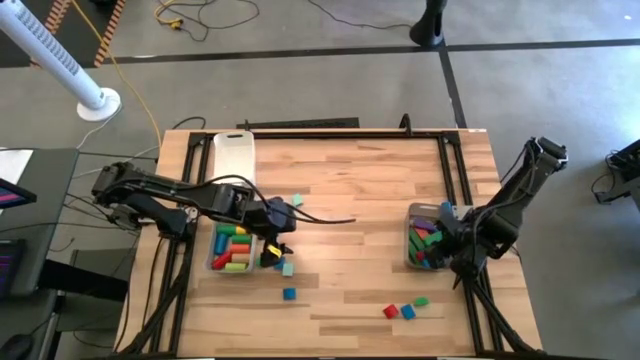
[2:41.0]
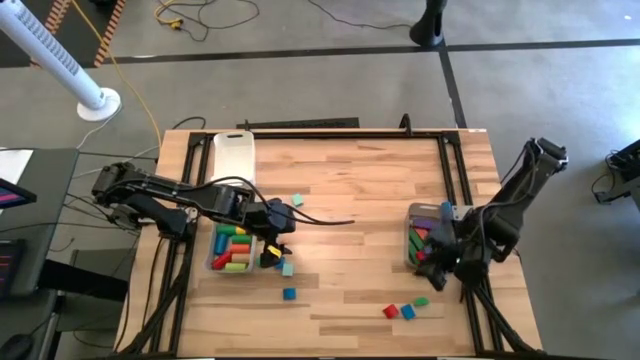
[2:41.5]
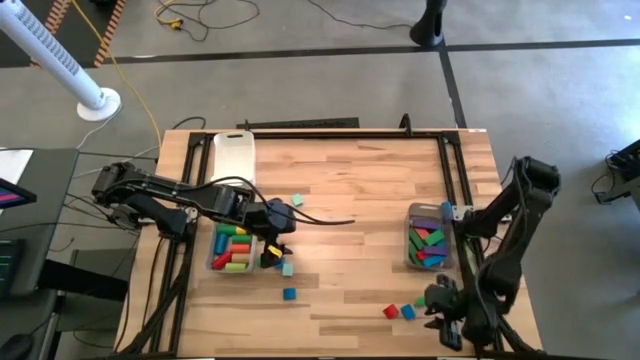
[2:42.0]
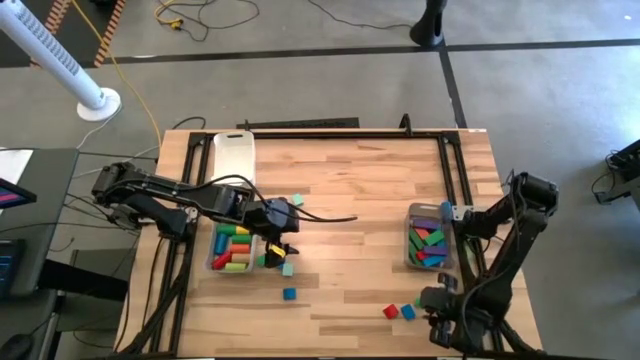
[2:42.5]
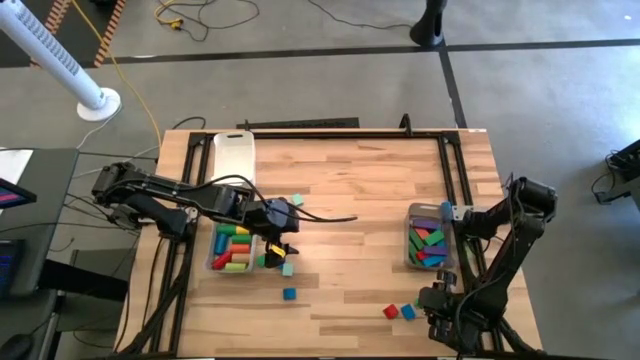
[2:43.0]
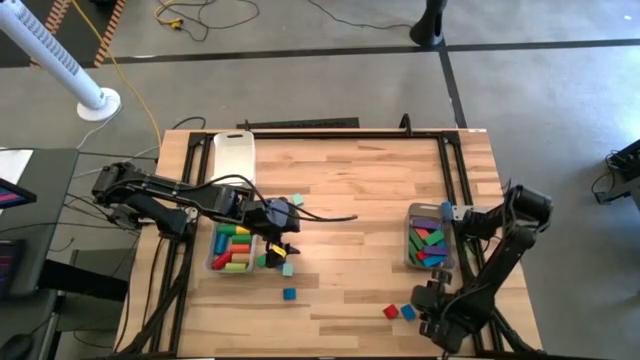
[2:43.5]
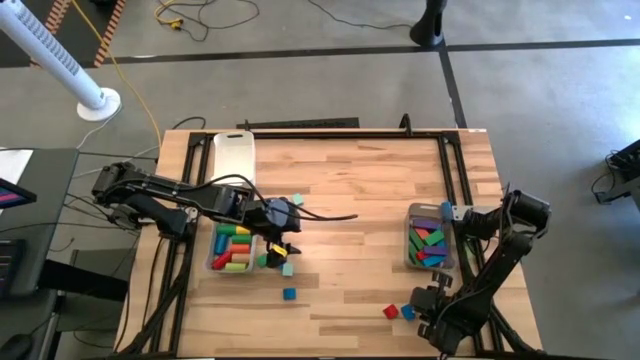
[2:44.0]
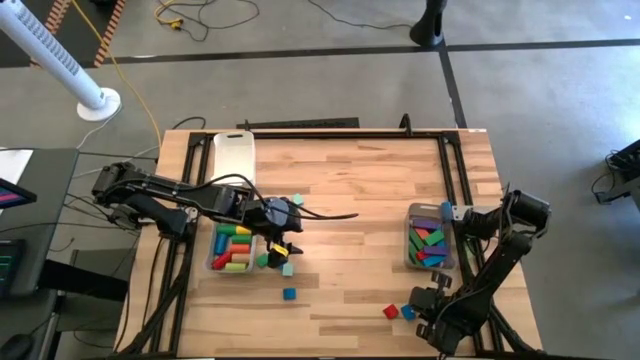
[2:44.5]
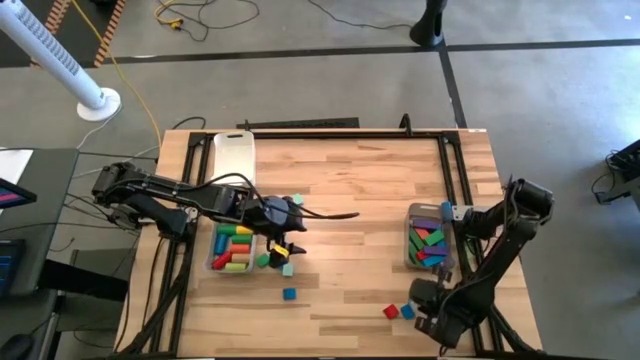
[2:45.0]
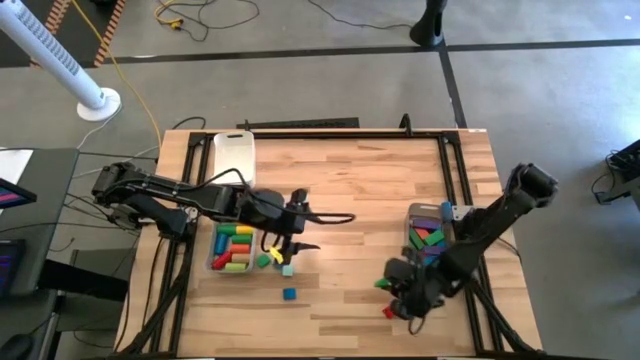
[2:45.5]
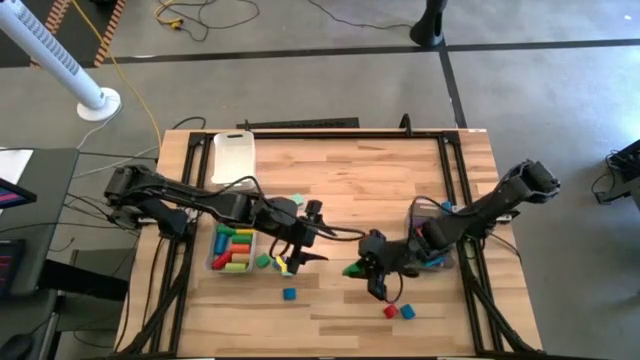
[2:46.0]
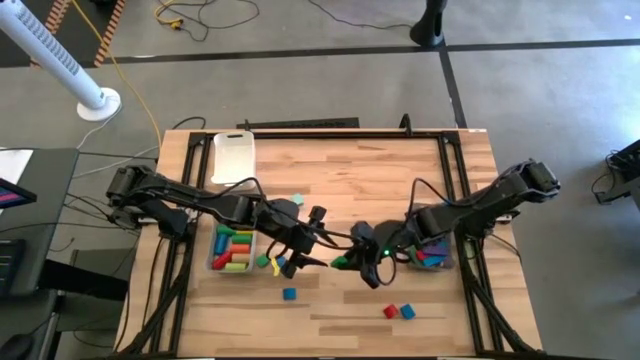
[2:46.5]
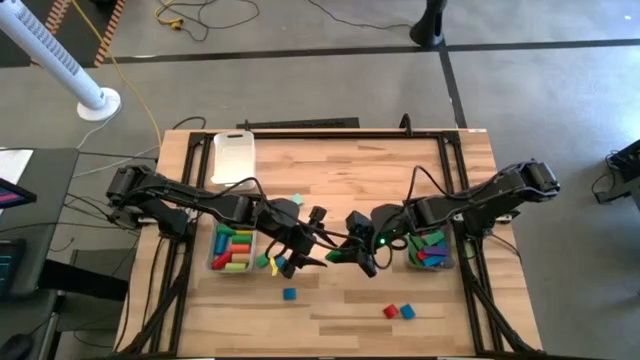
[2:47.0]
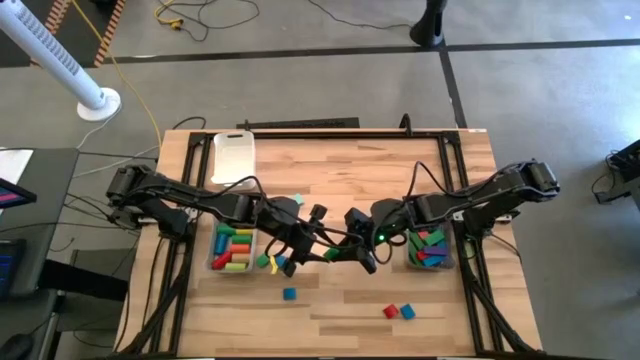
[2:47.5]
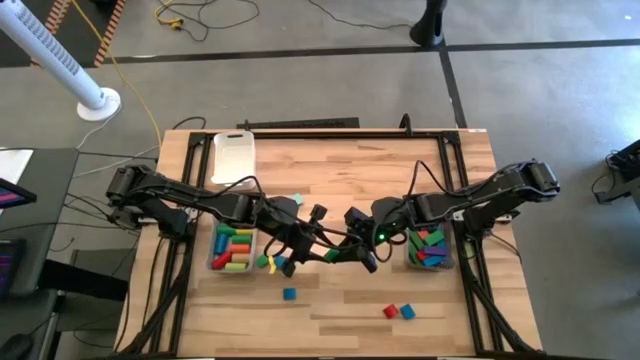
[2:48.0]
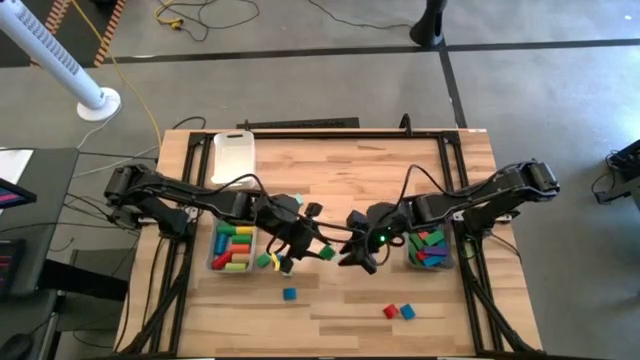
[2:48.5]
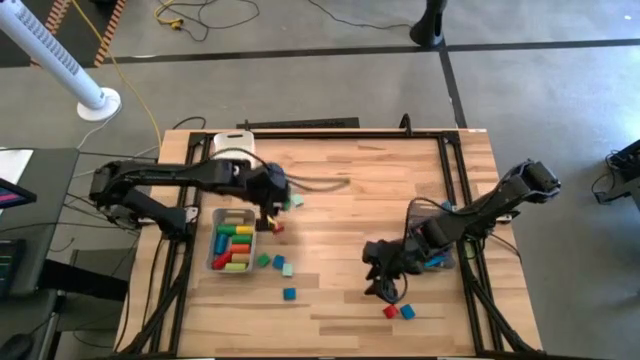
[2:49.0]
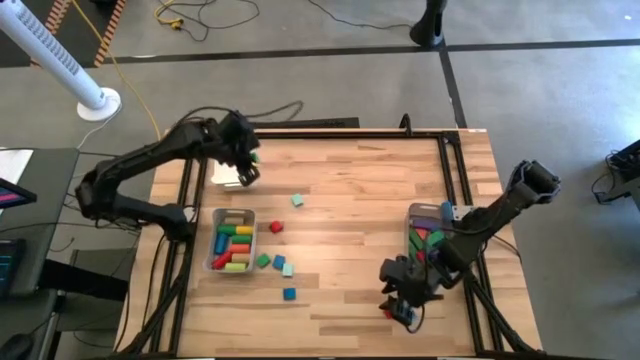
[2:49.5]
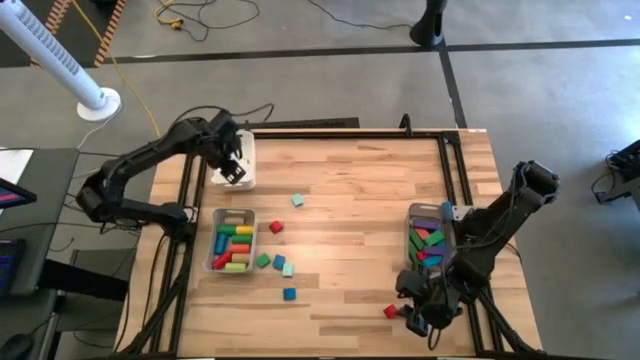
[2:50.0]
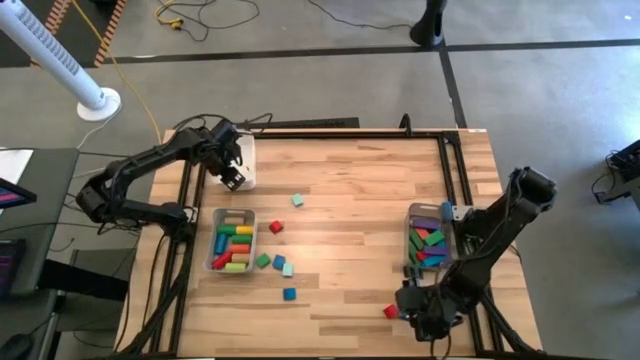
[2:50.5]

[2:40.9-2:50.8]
Task: Sort blocks by size
Put the dark green semicircular block into the white bin

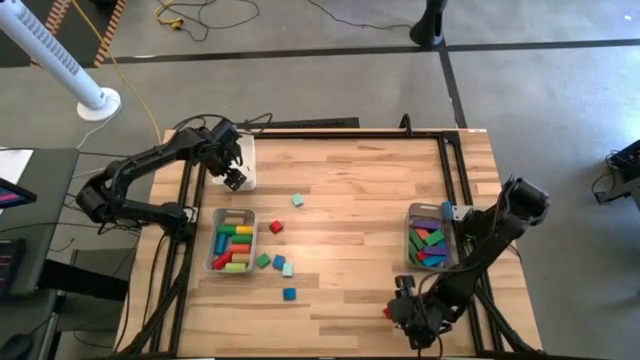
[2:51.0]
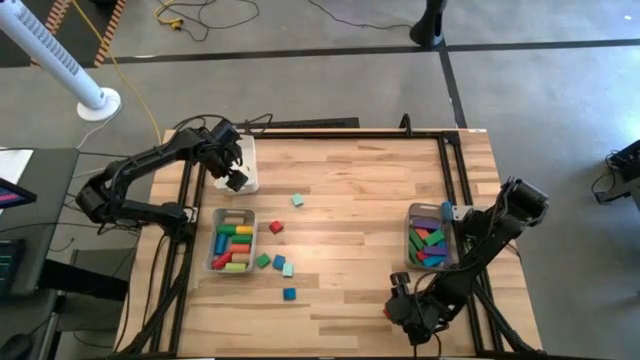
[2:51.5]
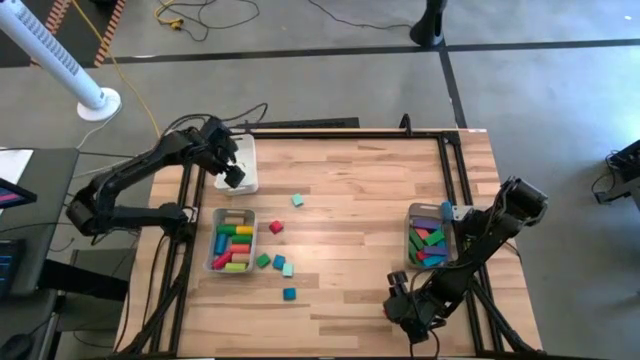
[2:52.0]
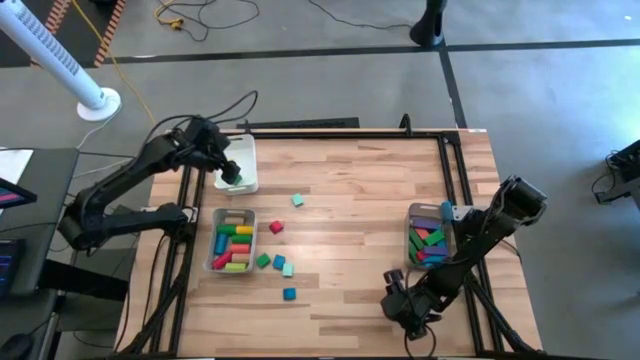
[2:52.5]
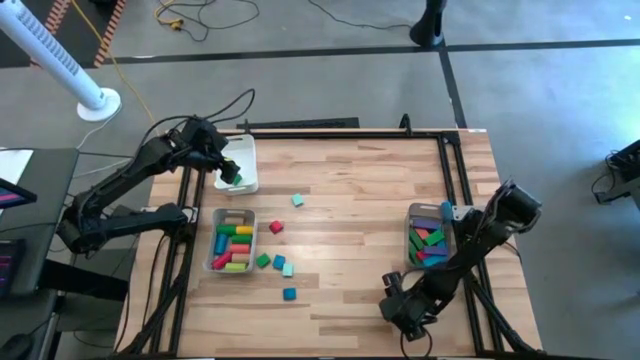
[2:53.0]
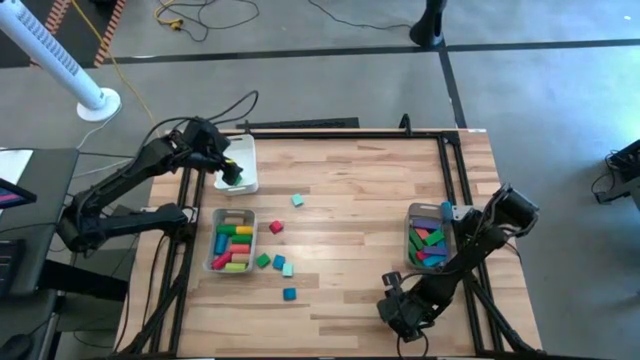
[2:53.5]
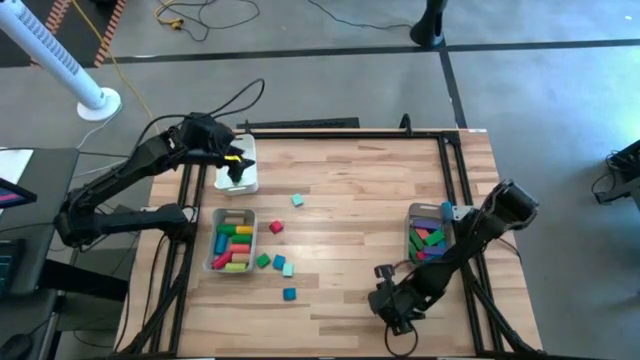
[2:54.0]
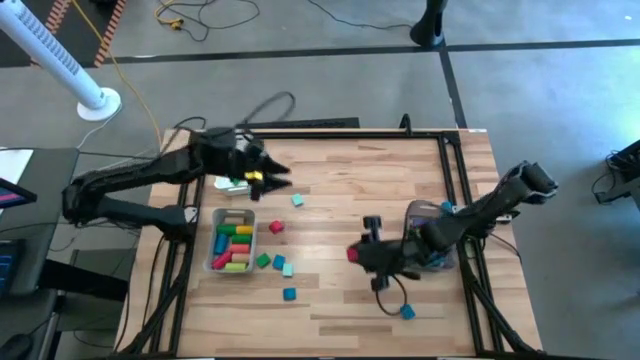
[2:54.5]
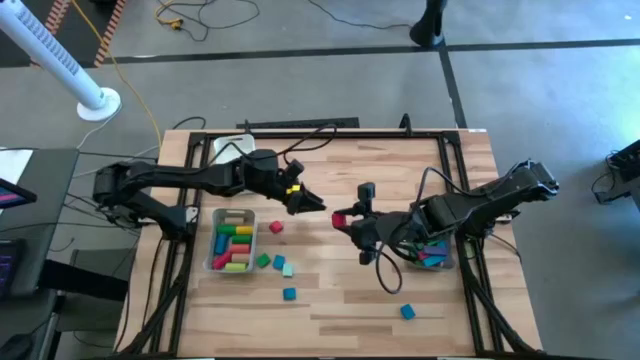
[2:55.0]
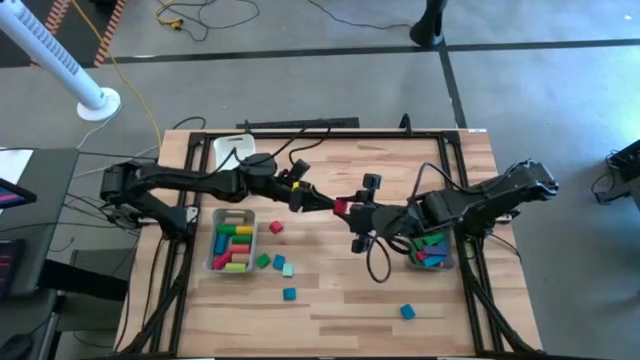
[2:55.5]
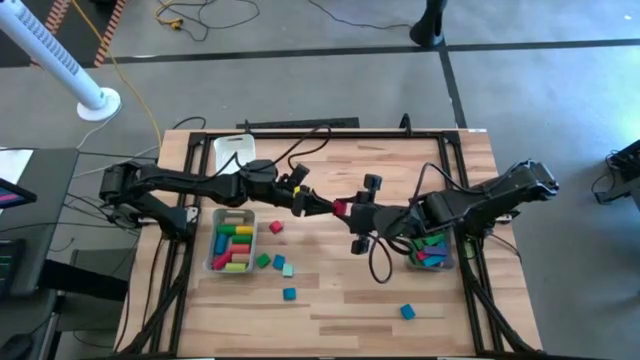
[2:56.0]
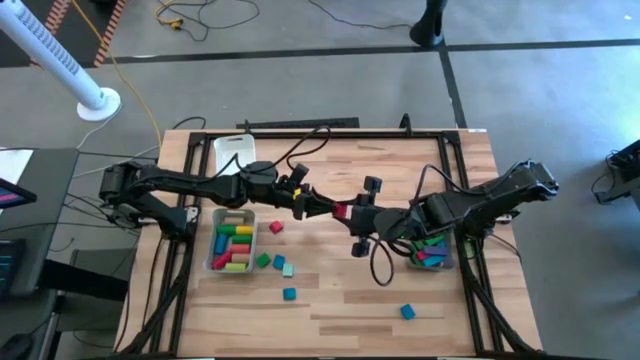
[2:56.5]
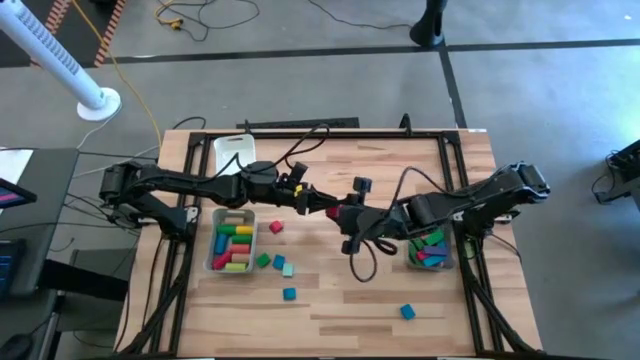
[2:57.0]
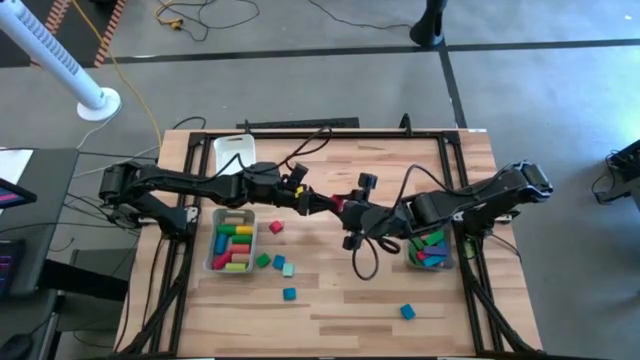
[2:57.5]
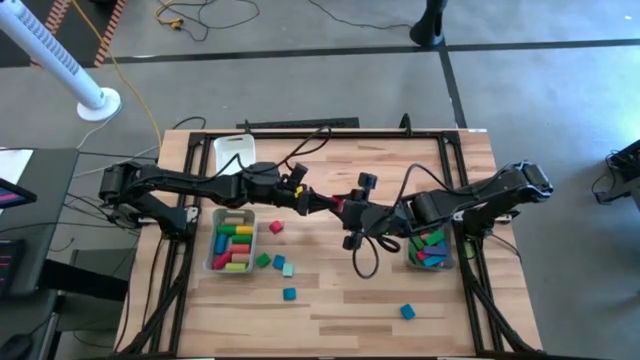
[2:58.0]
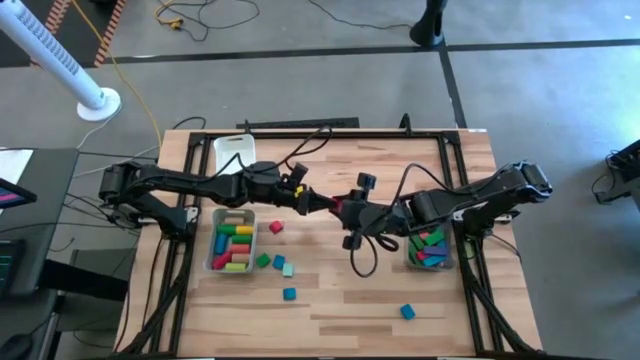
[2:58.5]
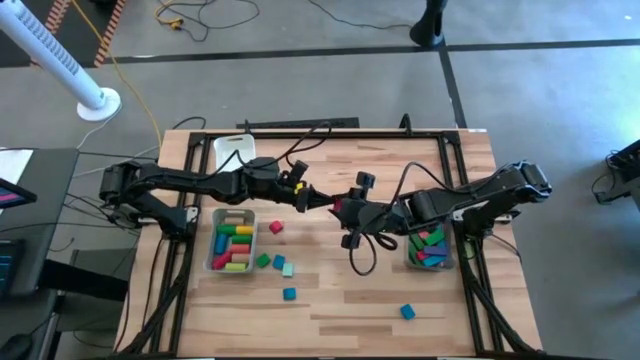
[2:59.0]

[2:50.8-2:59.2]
Put the red semicircular block into the white bin

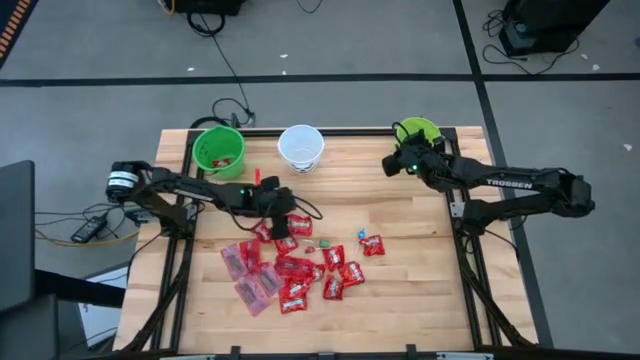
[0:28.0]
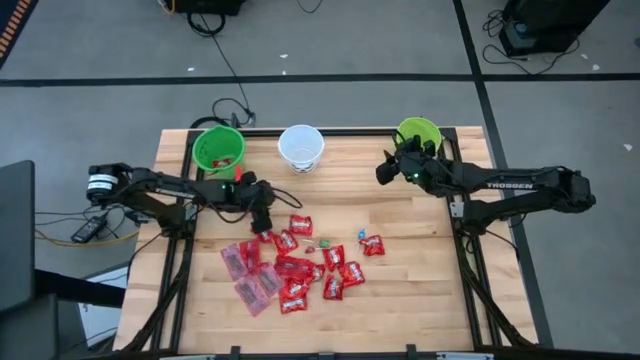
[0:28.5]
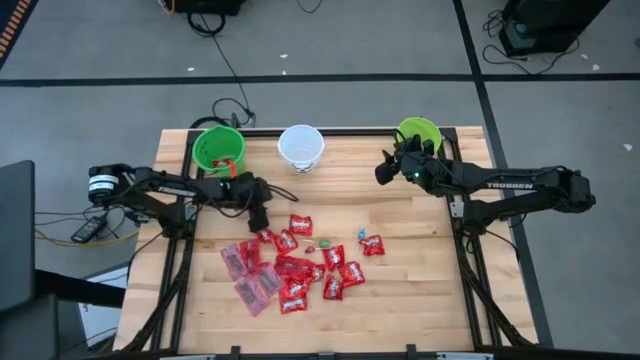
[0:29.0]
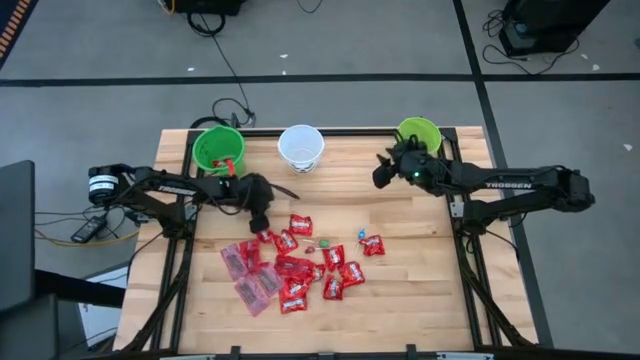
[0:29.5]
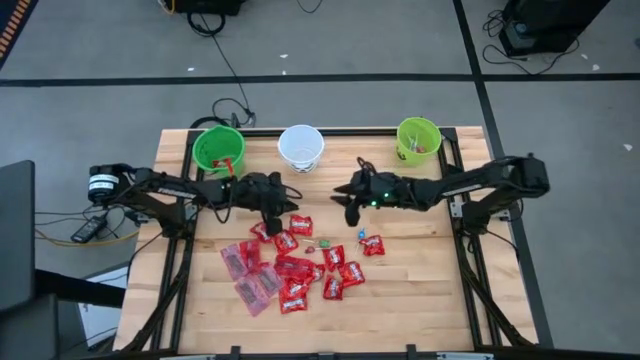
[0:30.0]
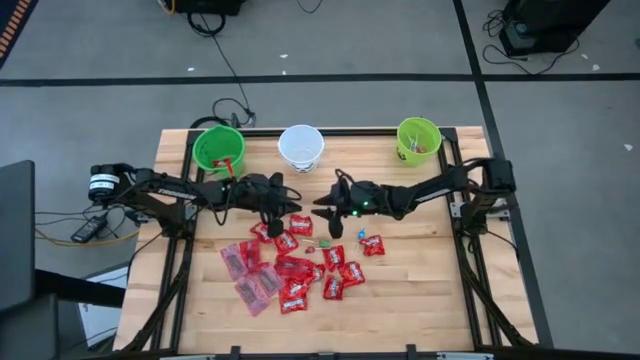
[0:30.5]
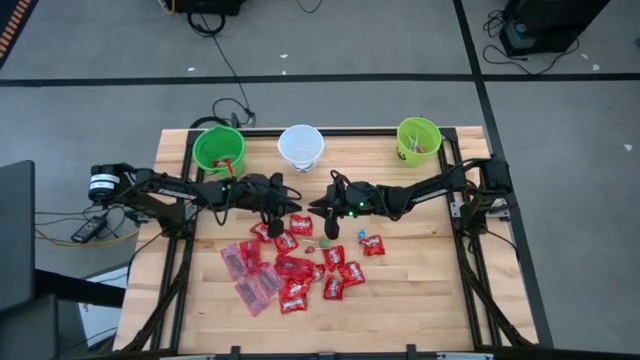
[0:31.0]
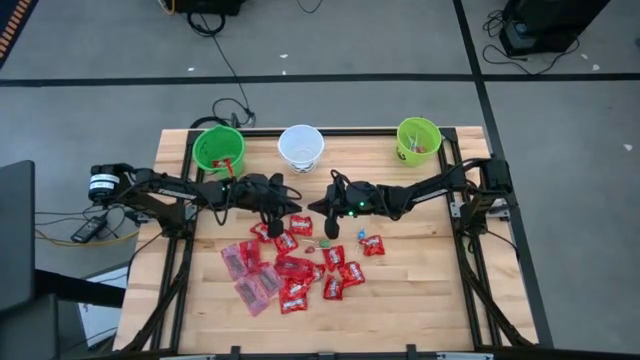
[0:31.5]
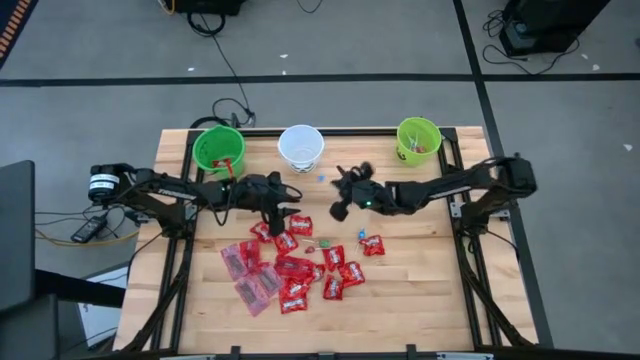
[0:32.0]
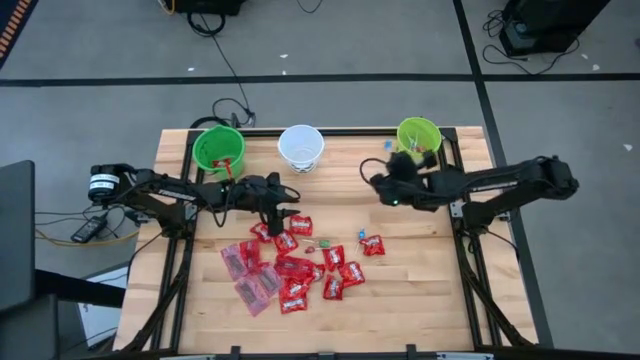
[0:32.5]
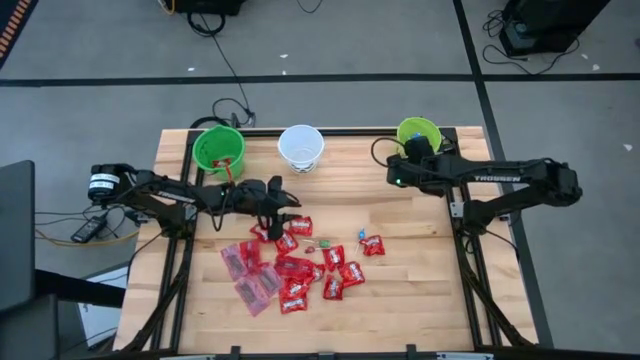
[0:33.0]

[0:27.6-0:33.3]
Task: Sort candy by brand, put in halloween buckets
Put the blue lollipop into the light green bucket
